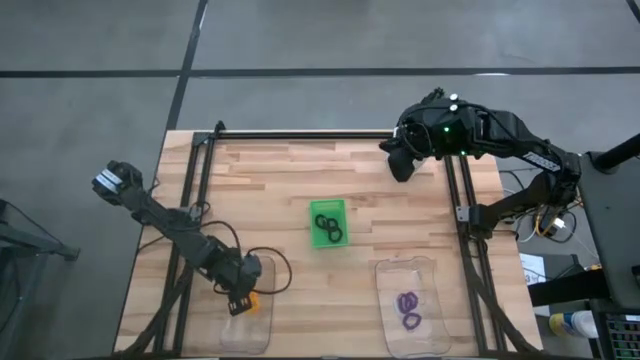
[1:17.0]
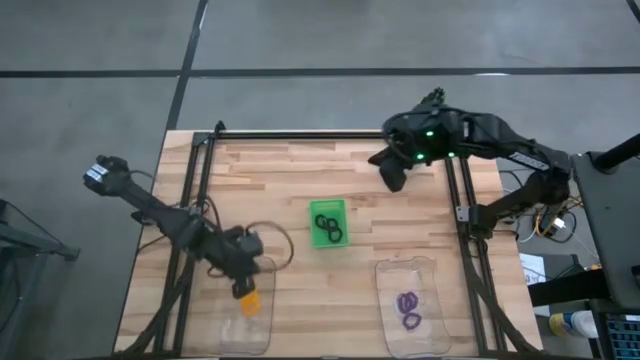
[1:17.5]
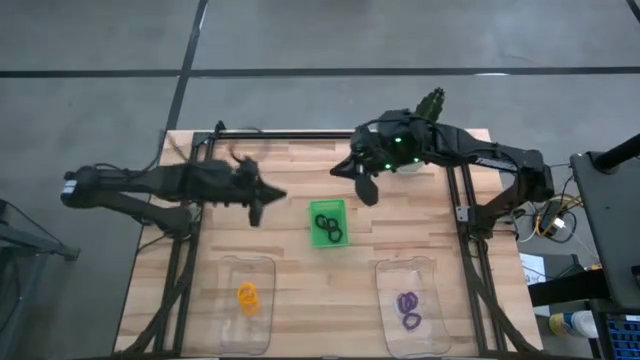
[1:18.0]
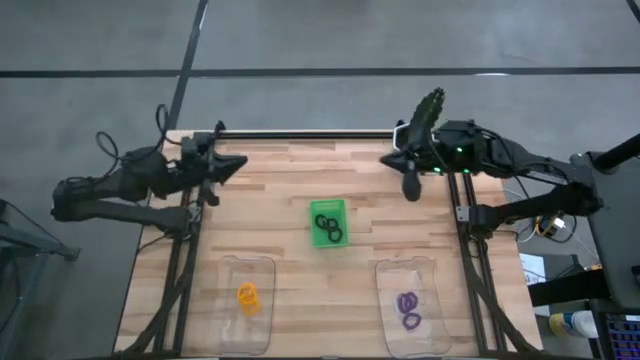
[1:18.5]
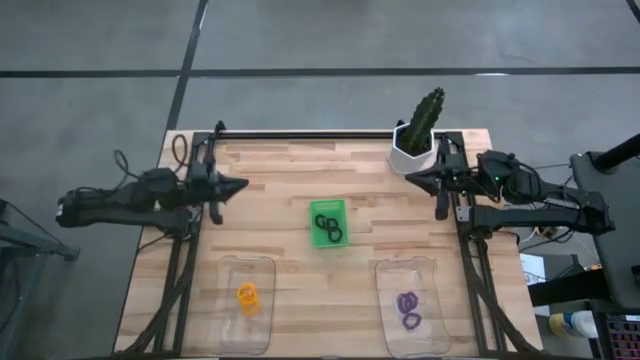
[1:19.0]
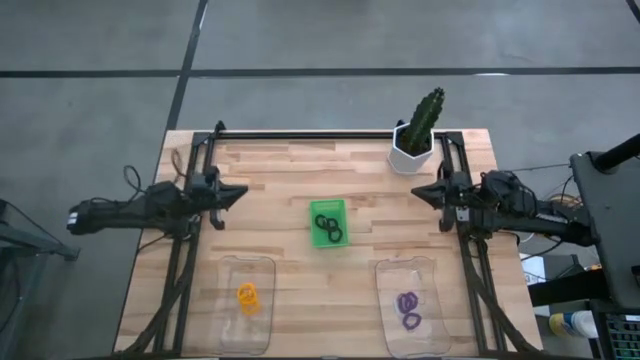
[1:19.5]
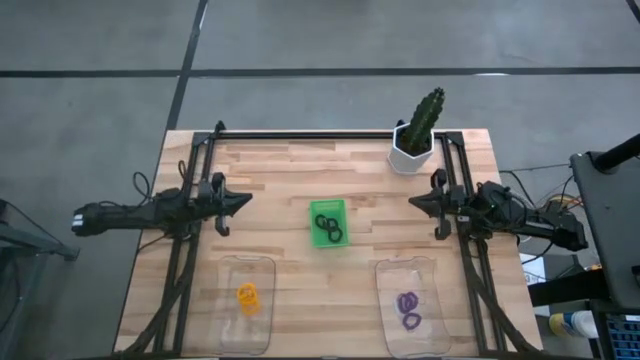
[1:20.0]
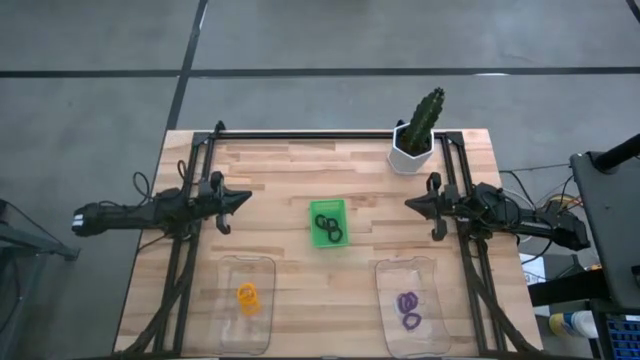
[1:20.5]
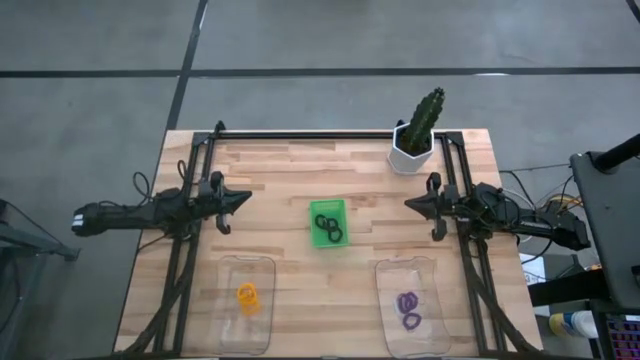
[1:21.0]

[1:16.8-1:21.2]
Task: Sort spring keychains
Return to Home Position

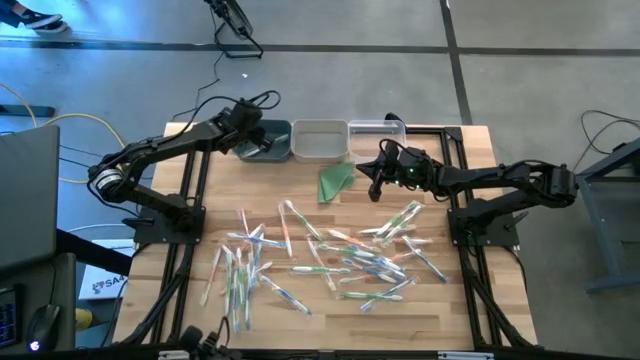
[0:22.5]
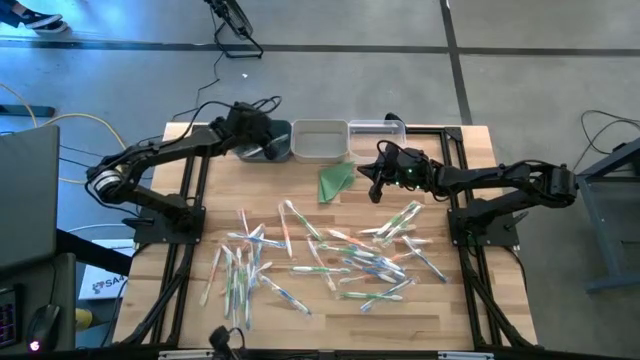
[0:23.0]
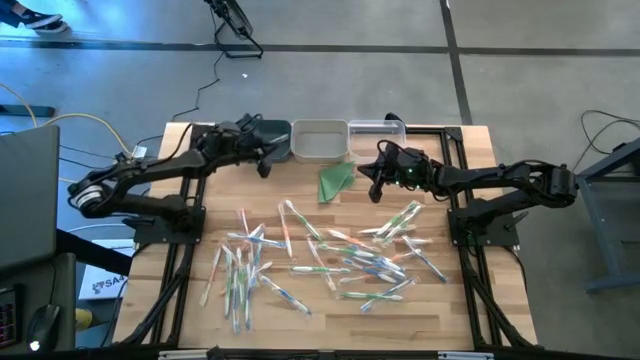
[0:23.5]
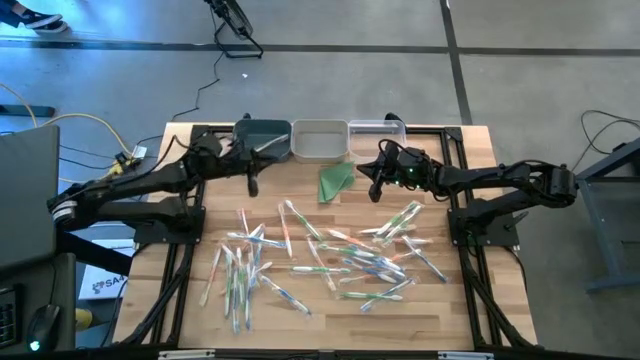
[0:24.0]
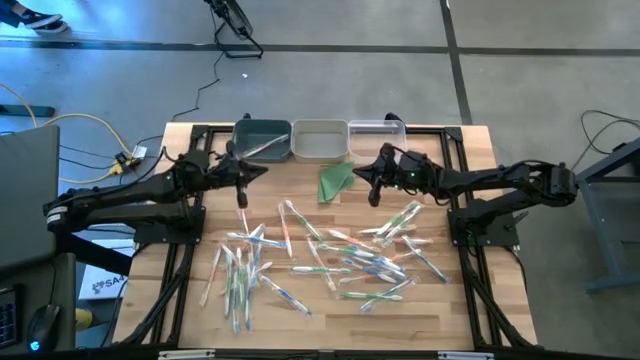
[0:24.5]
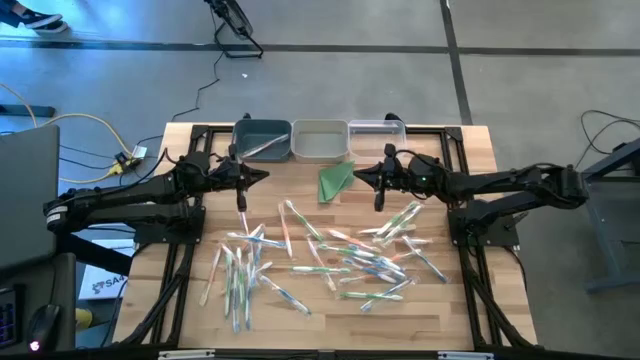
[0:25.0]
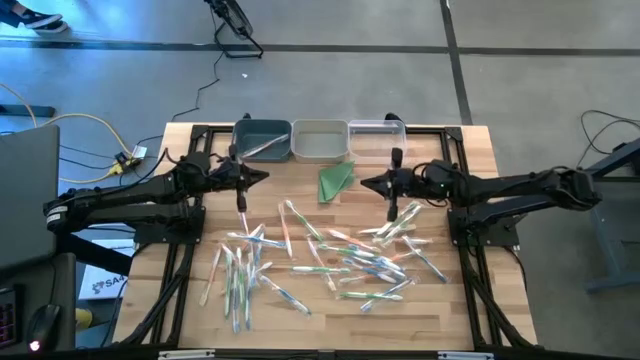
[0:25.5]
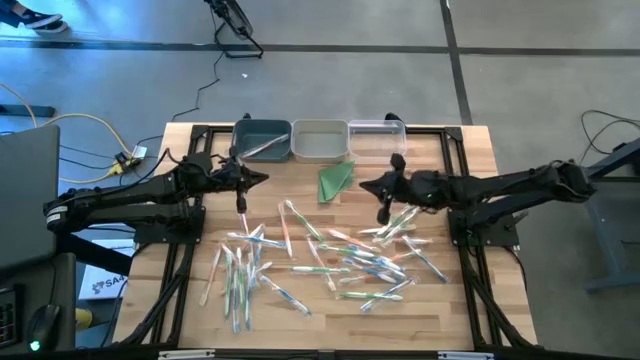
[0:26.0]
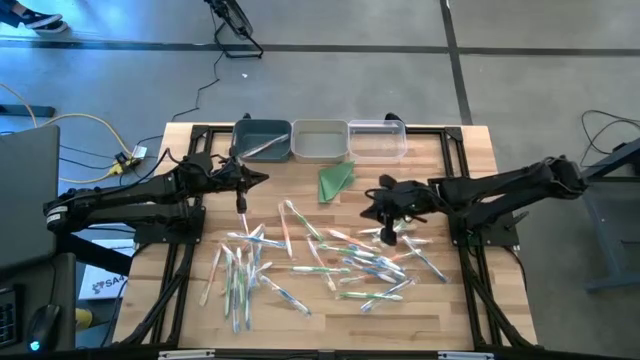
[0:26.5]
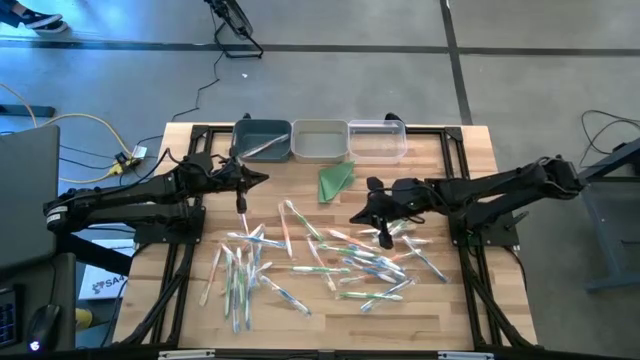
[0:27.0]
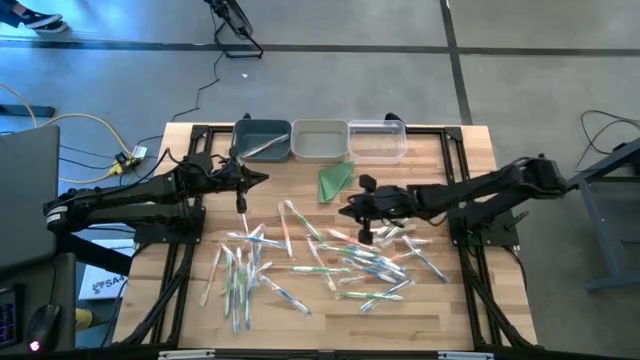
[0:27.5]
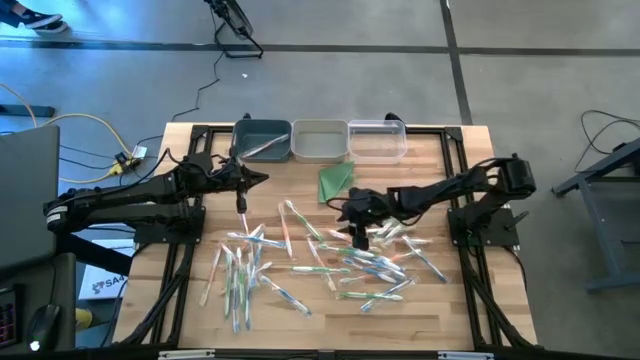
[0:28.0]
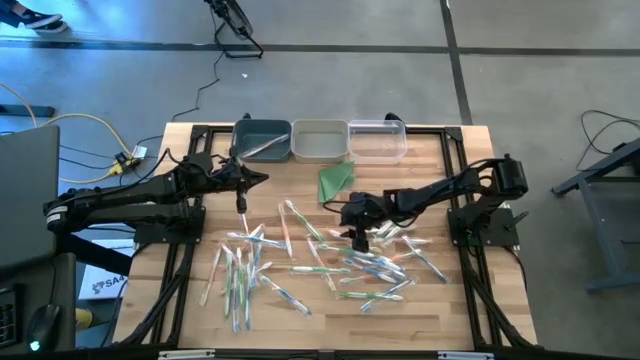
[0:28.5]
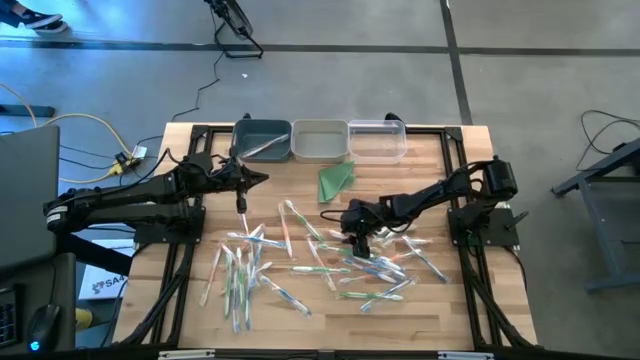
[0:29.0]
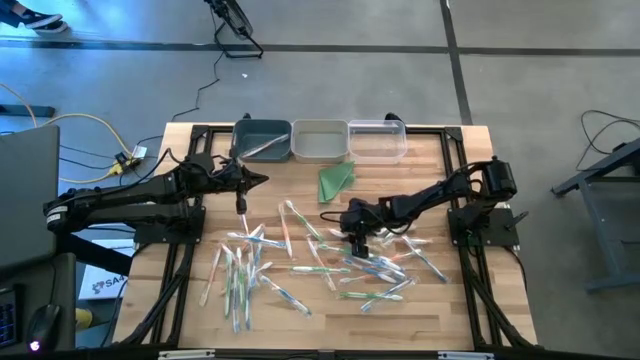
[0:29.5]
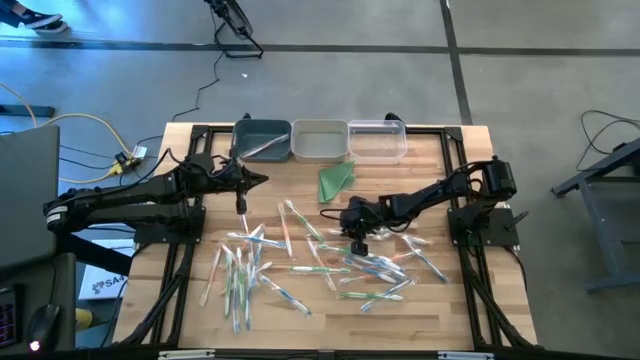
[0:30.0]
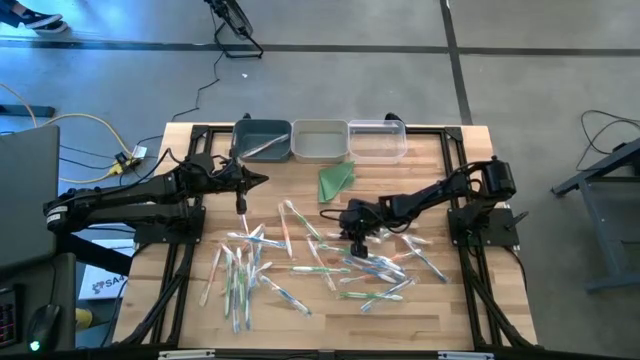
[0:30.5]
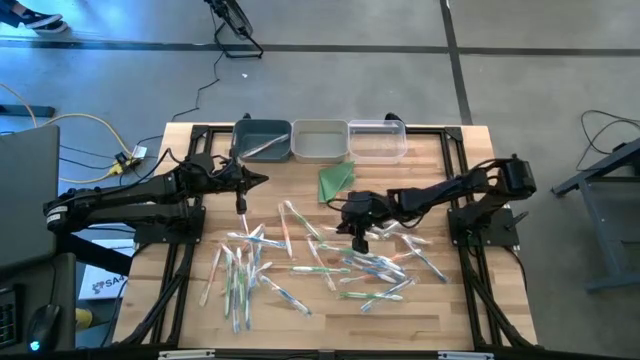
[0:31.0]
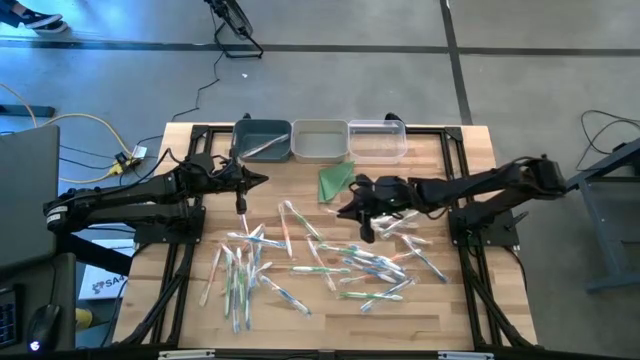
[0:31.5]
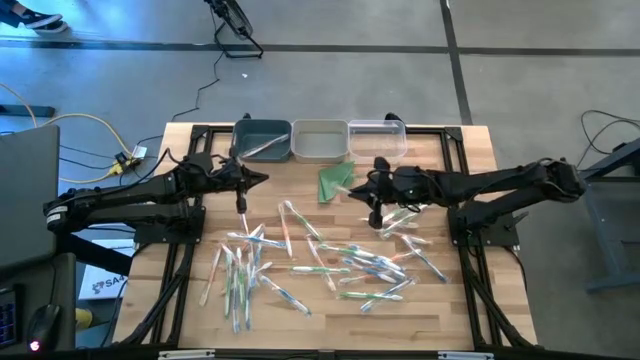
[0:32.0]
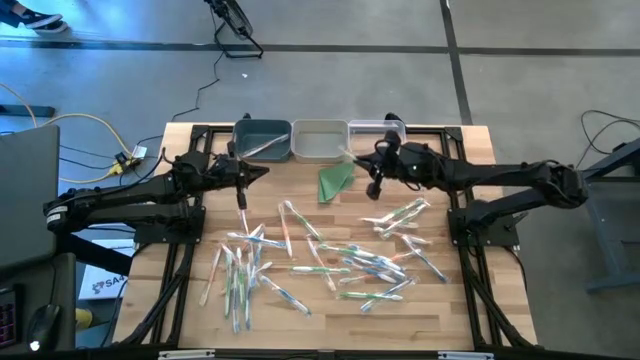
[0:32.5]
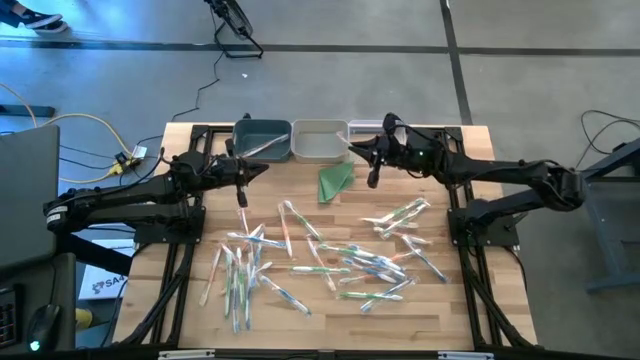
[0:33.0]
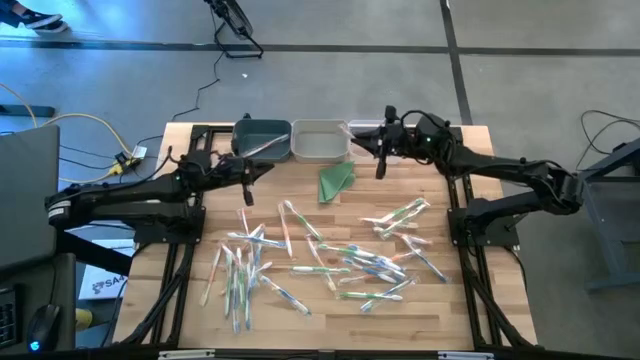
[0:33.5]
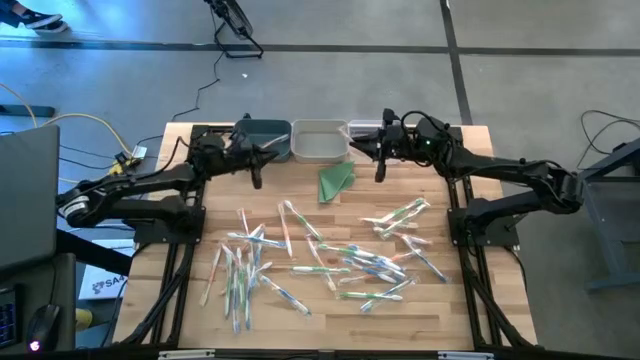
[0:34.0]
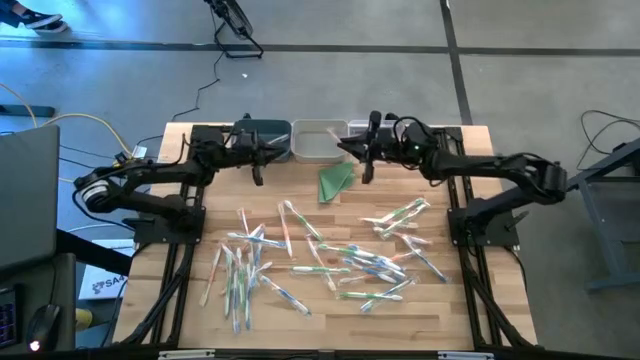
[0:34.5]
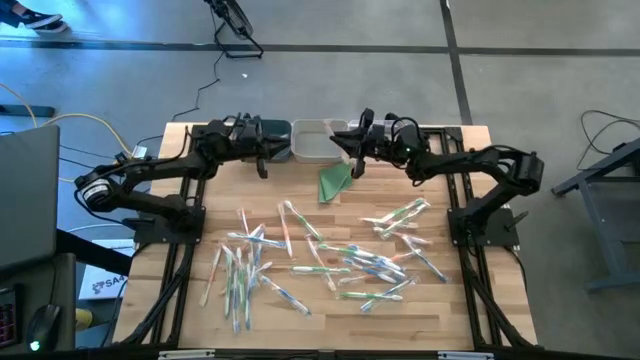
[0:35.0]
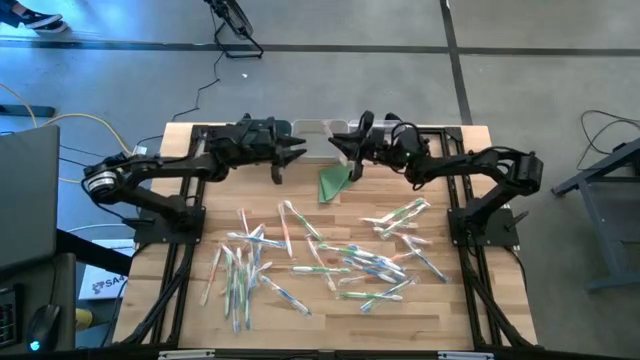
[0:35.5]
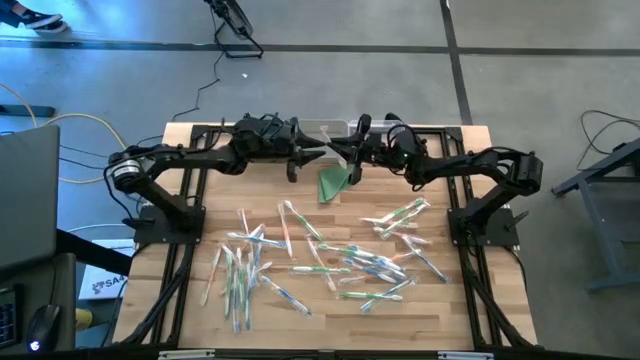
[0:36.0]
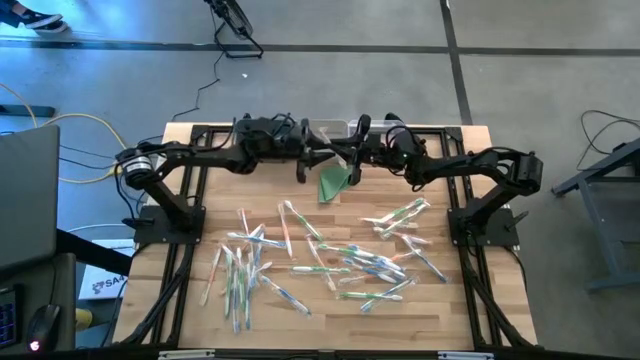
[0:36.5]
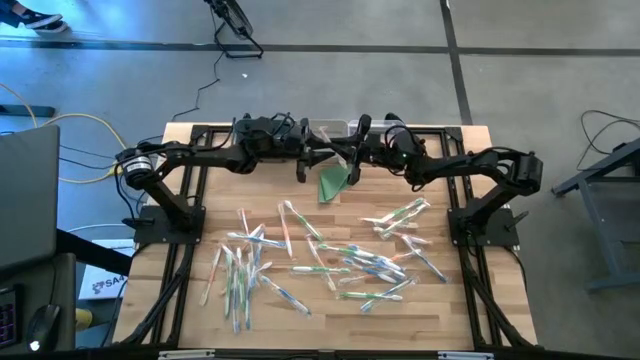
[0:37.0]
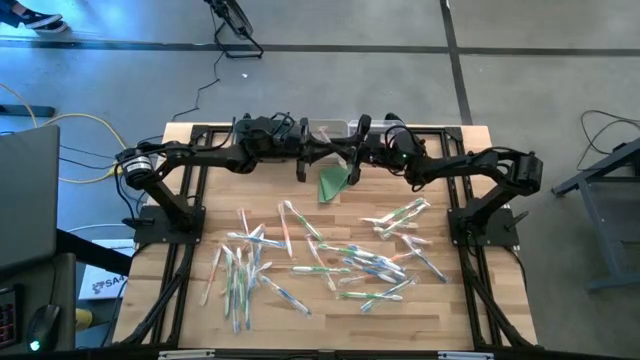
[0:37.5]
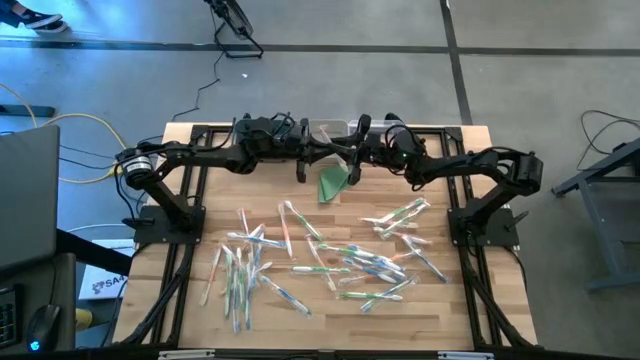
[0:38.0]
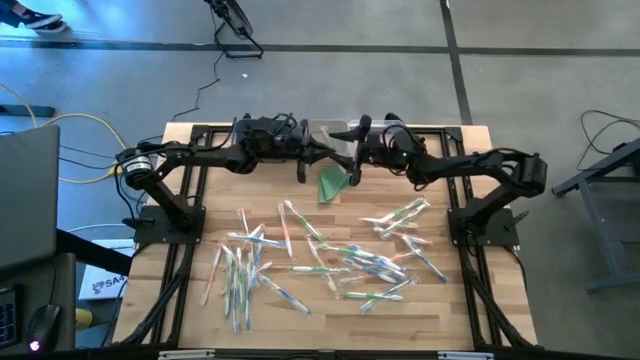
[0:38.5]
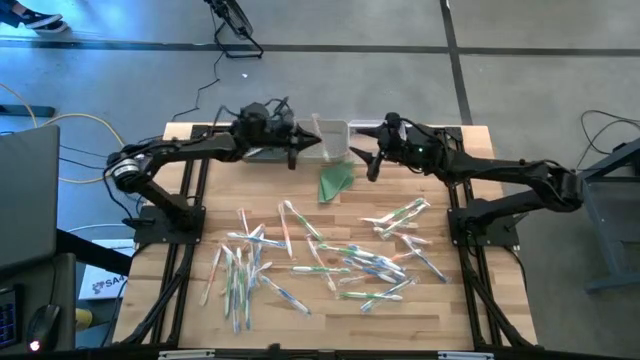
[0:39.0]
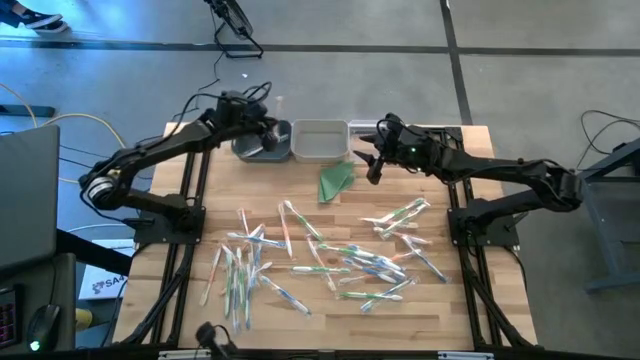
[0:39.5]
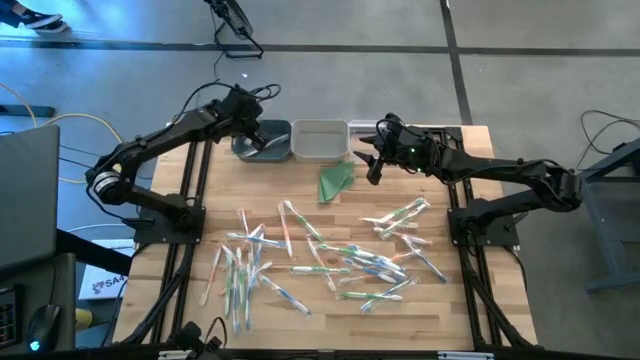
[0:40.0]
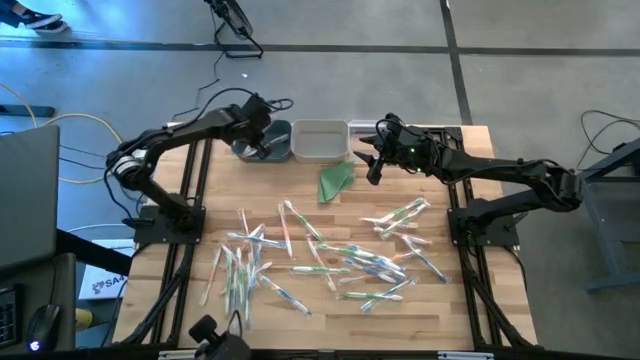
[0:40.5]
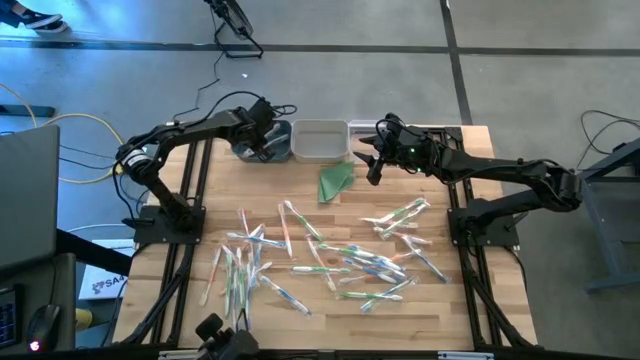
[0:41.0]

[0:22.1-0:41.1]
Task: Pick & Place Toothbrushes
Put the orange toothbrush into the dark blue bin
